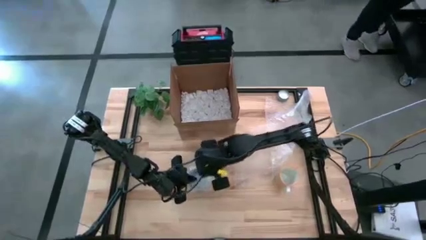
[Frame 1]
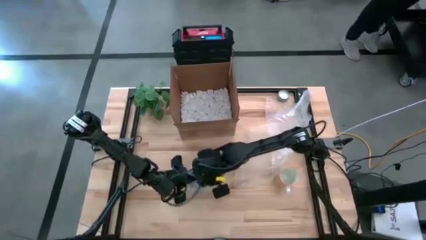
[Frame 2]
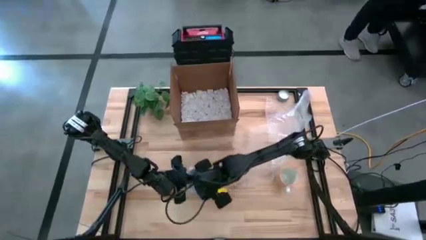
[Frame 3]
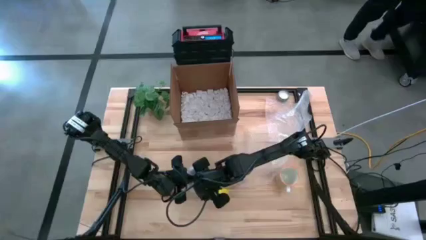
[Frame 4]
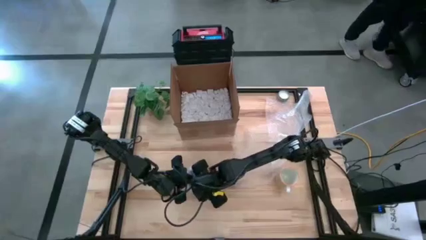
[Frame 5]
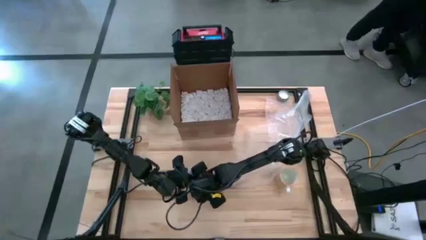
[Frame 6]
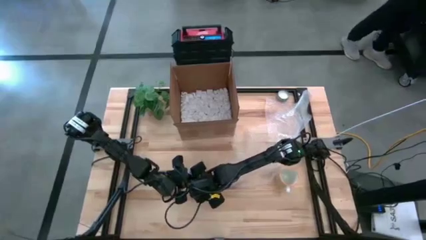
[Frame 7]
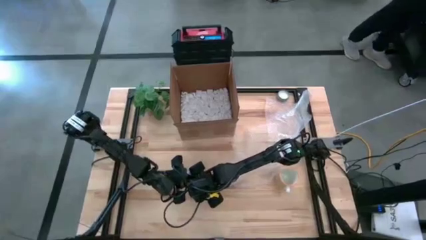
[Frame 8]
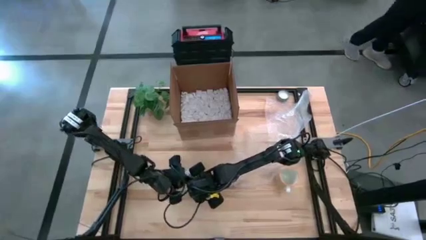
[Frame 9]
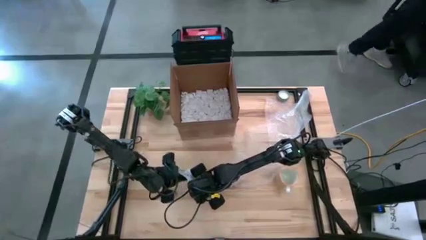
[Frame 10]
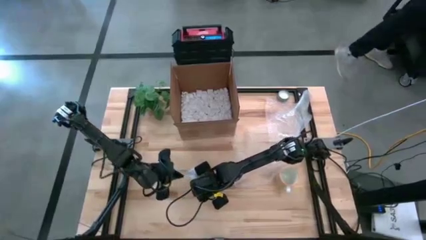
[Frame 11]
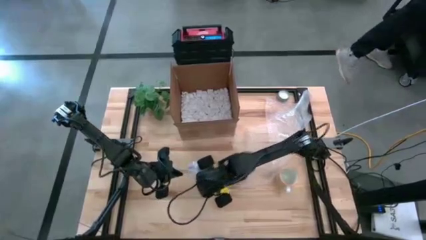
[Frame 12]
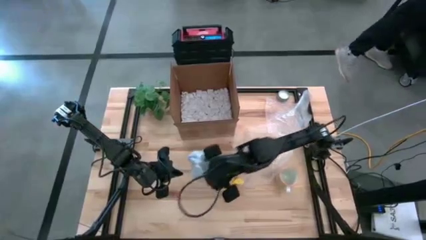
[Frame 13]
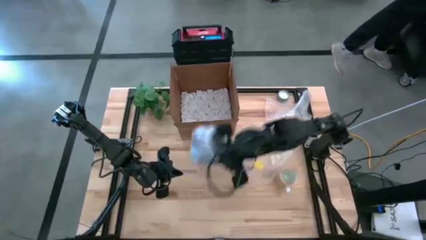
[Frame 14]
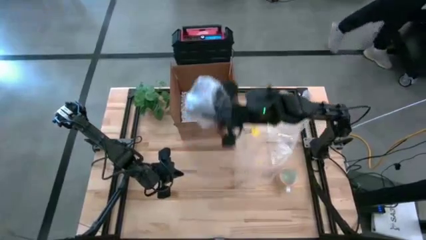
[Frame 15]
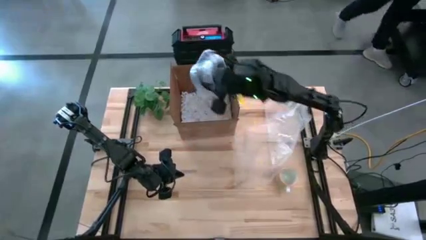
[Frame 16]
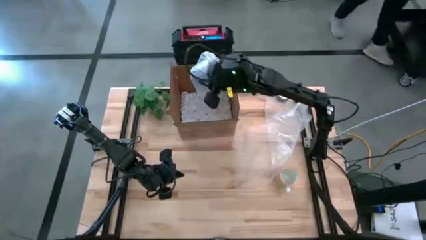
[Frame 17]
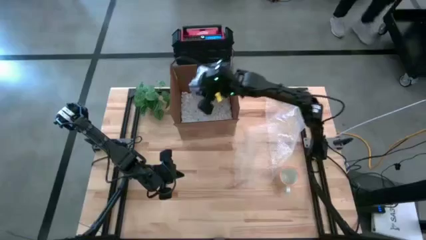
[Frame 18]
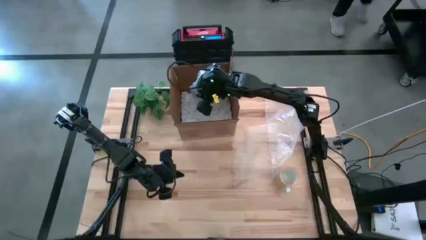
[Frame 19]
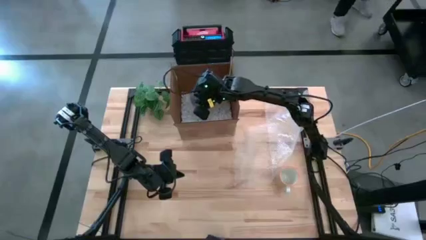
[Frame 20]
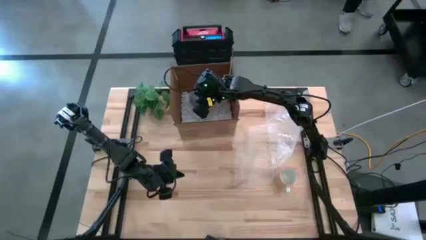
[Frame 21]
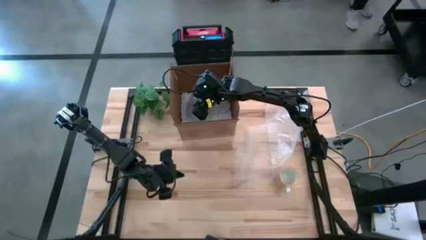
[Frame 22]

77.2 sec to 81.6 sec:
Task: wrap mug
Put the wrapped blue mug into the cardboard box

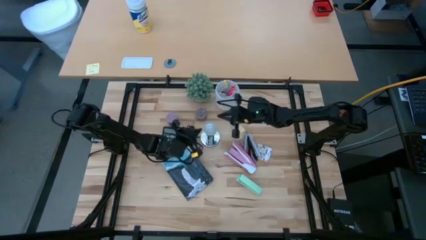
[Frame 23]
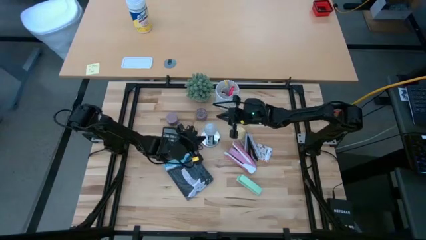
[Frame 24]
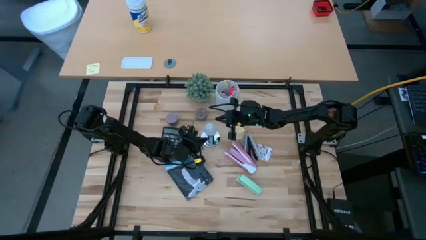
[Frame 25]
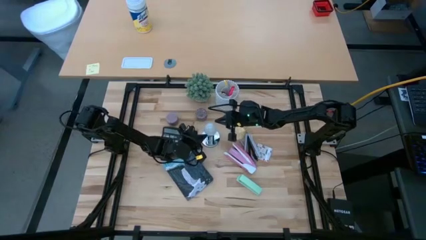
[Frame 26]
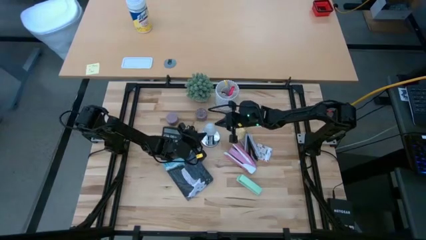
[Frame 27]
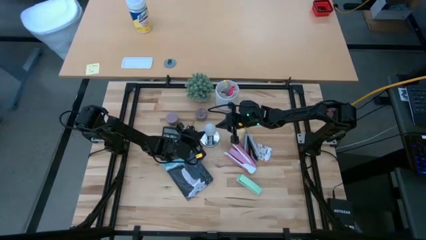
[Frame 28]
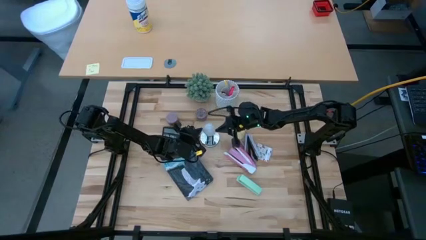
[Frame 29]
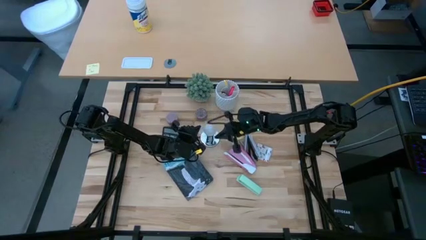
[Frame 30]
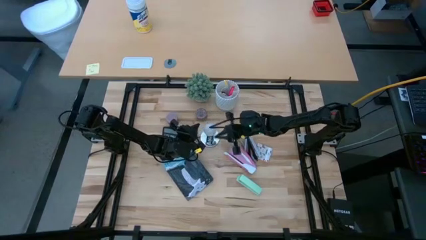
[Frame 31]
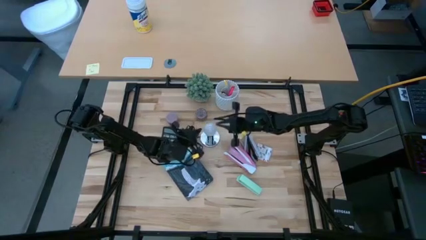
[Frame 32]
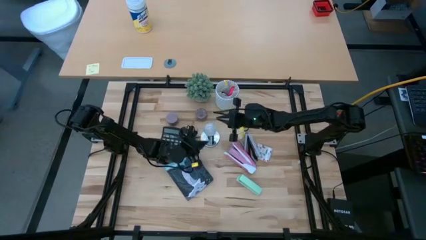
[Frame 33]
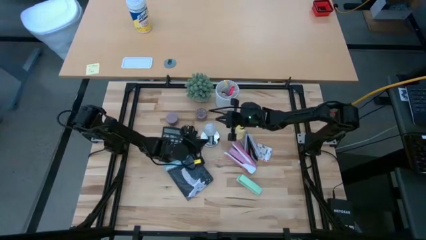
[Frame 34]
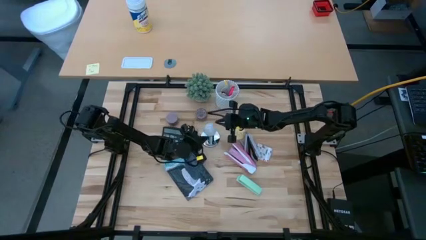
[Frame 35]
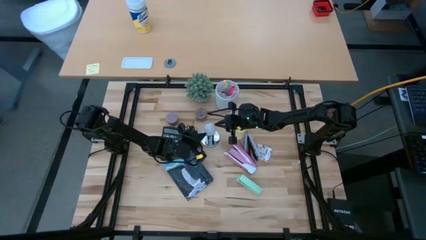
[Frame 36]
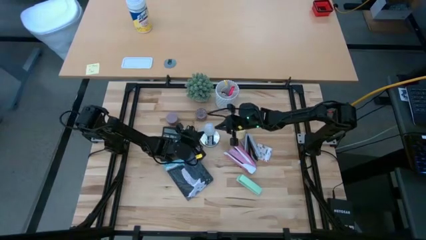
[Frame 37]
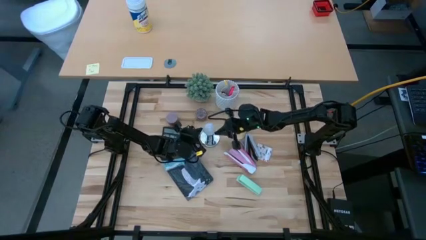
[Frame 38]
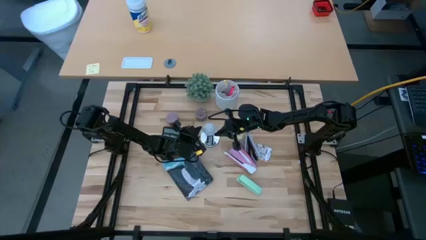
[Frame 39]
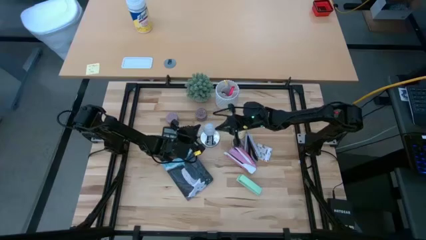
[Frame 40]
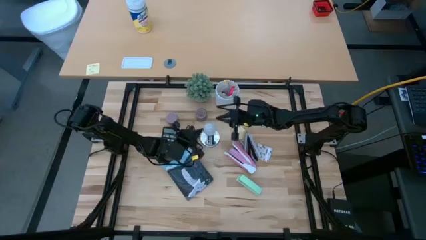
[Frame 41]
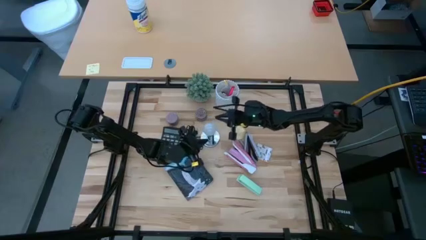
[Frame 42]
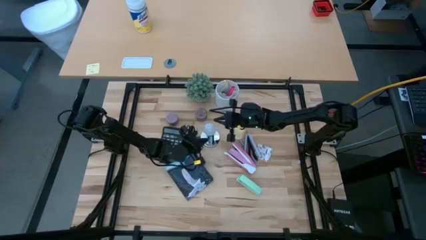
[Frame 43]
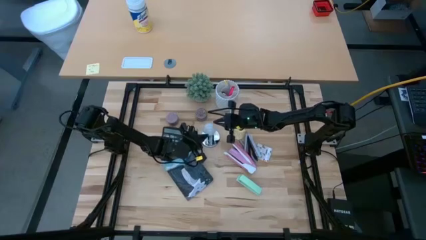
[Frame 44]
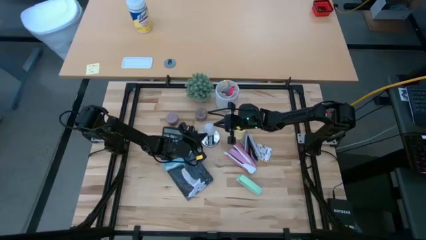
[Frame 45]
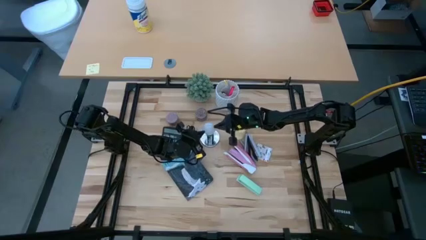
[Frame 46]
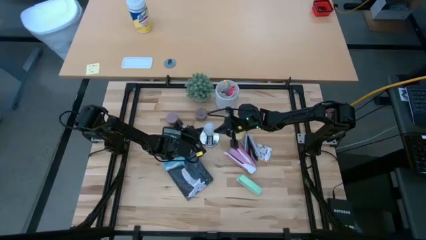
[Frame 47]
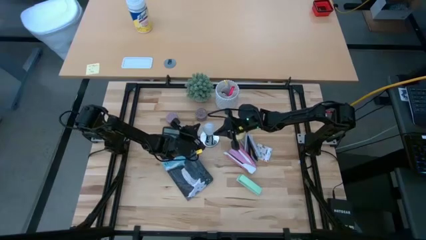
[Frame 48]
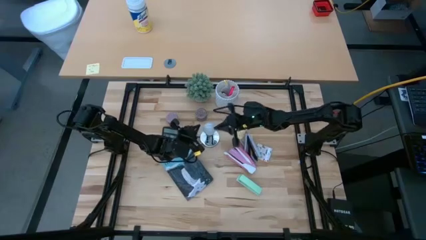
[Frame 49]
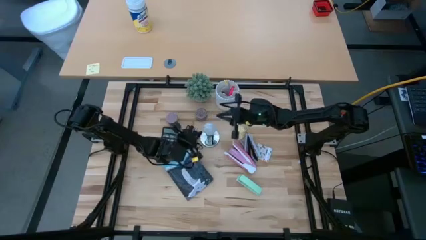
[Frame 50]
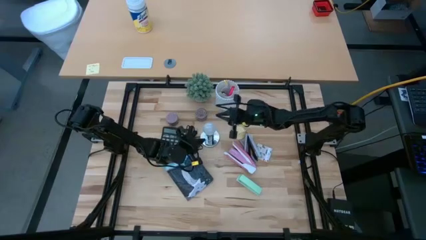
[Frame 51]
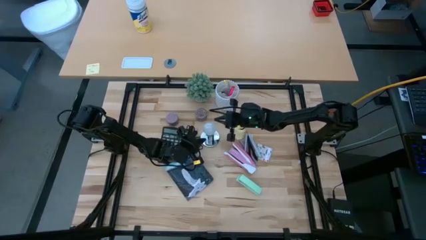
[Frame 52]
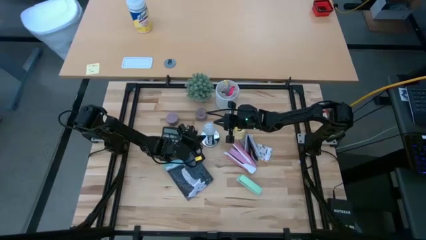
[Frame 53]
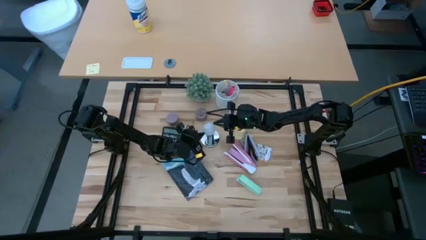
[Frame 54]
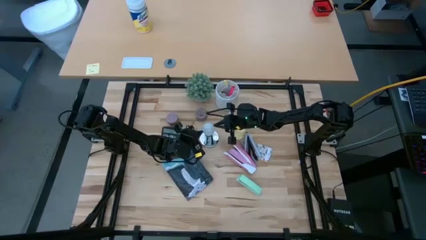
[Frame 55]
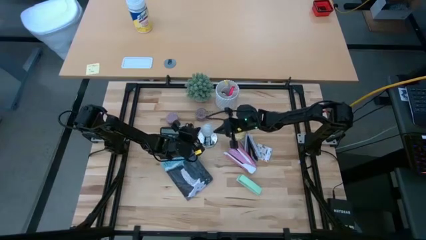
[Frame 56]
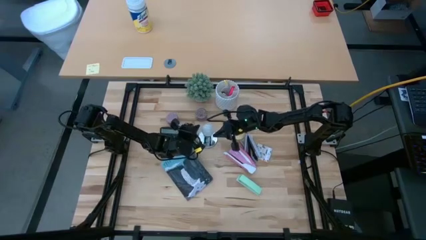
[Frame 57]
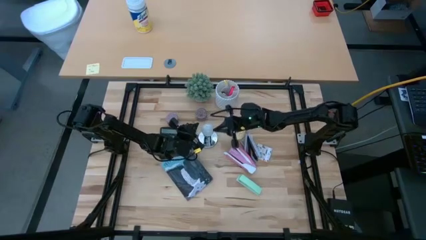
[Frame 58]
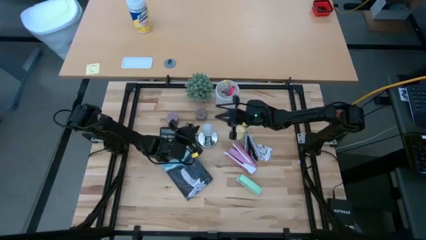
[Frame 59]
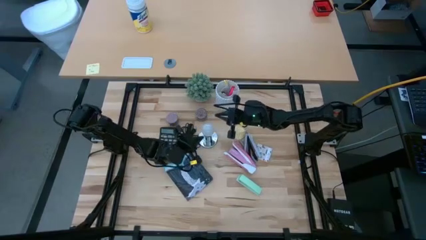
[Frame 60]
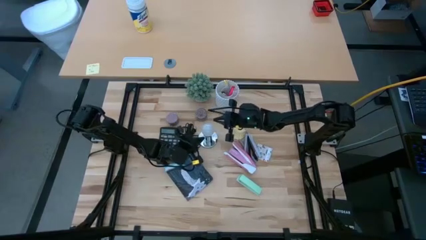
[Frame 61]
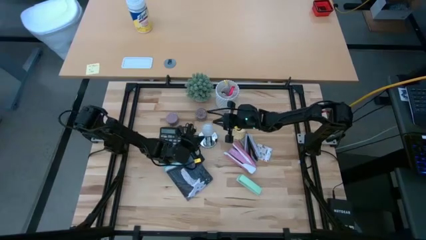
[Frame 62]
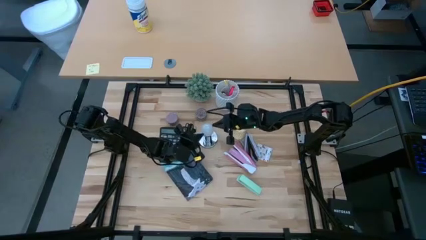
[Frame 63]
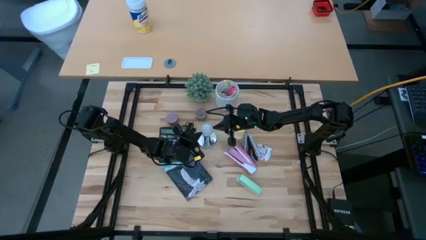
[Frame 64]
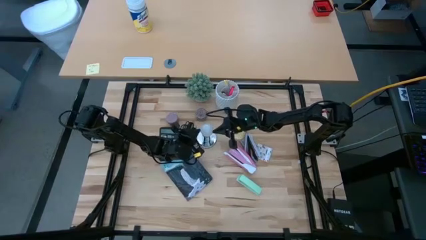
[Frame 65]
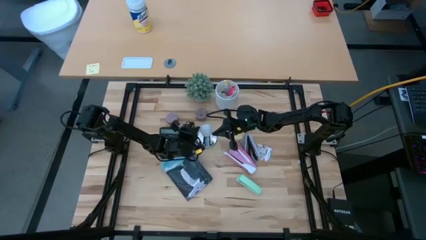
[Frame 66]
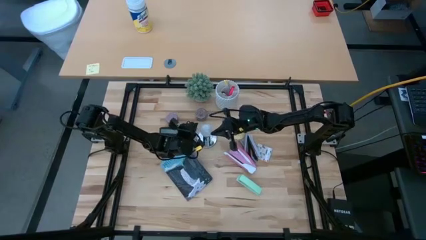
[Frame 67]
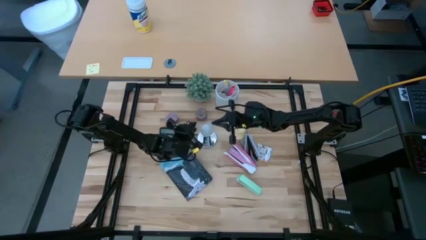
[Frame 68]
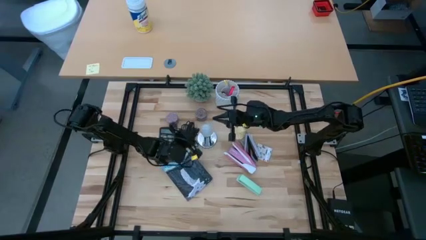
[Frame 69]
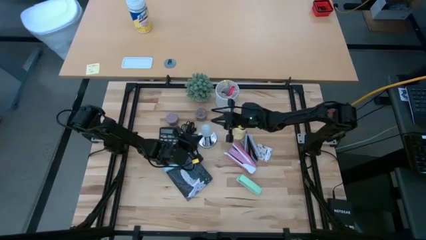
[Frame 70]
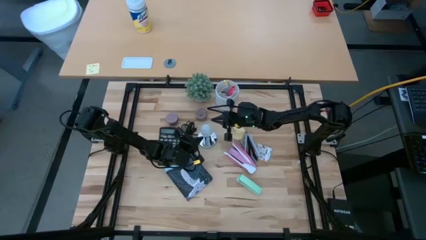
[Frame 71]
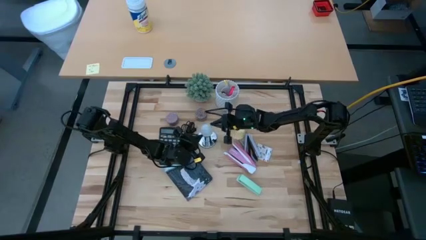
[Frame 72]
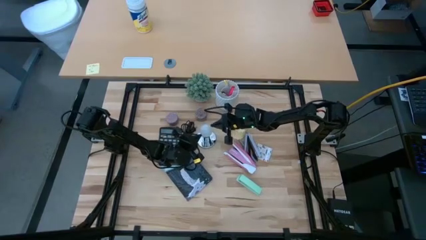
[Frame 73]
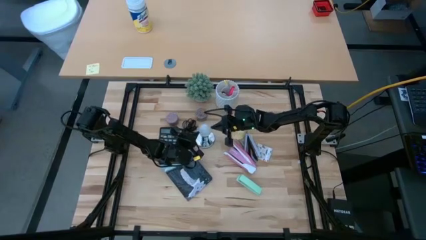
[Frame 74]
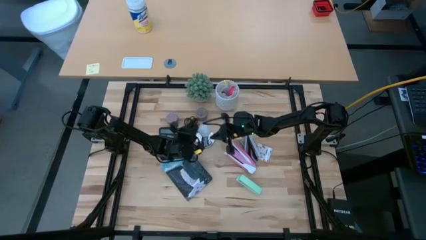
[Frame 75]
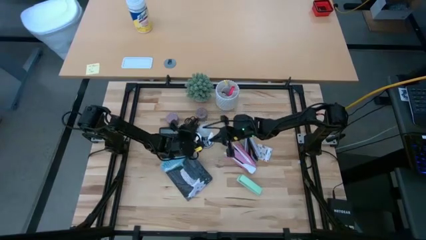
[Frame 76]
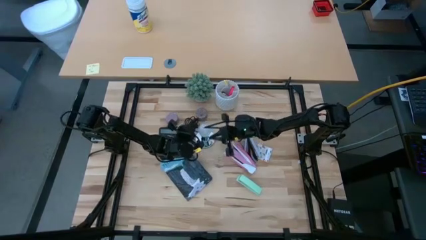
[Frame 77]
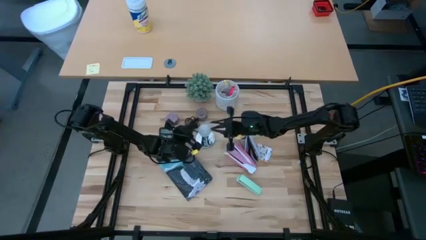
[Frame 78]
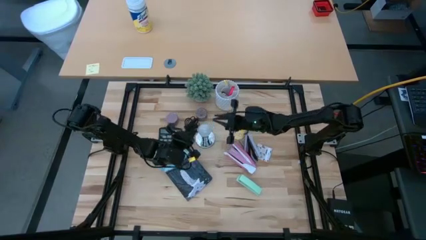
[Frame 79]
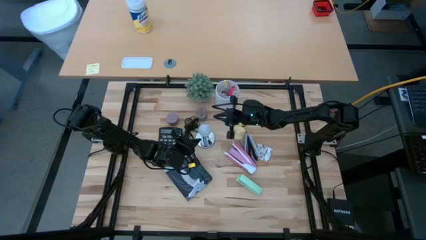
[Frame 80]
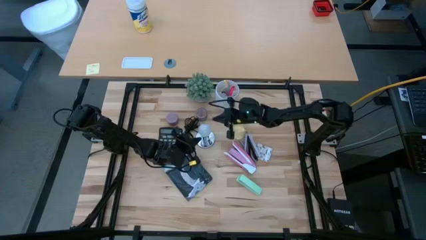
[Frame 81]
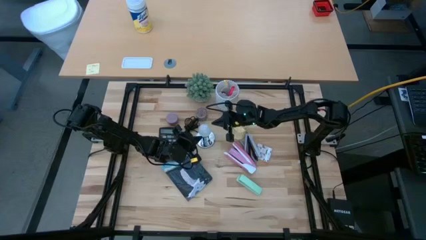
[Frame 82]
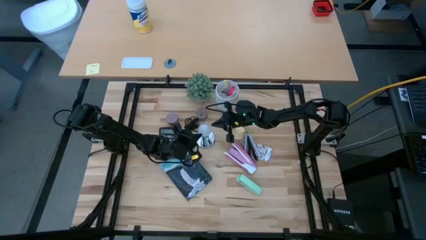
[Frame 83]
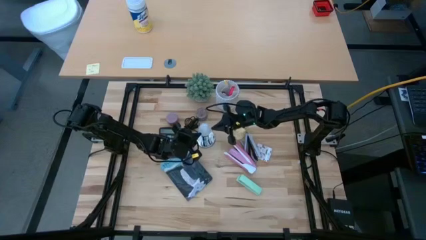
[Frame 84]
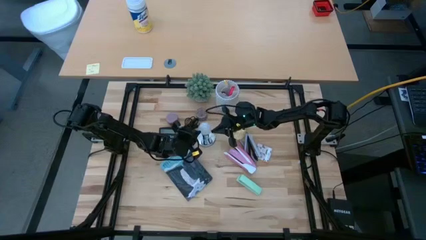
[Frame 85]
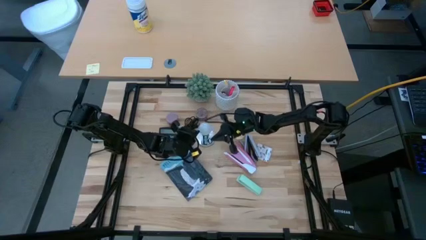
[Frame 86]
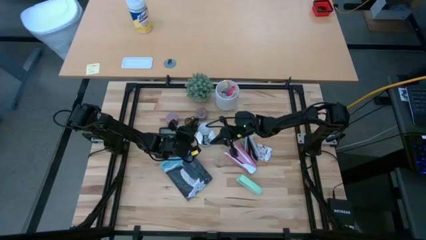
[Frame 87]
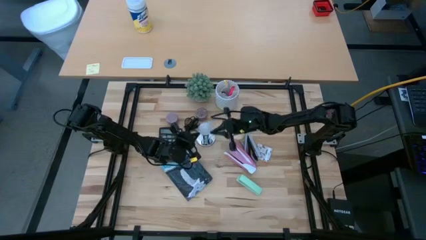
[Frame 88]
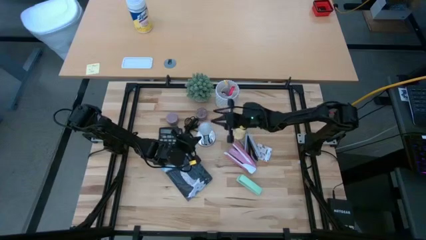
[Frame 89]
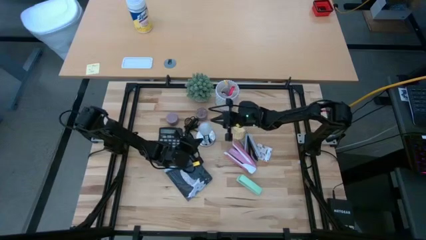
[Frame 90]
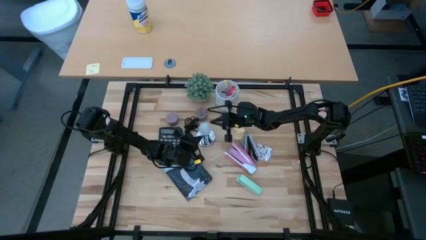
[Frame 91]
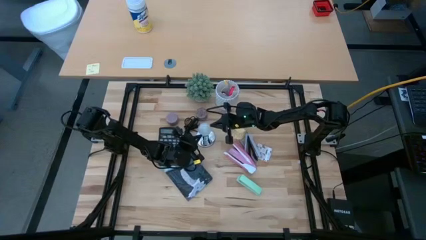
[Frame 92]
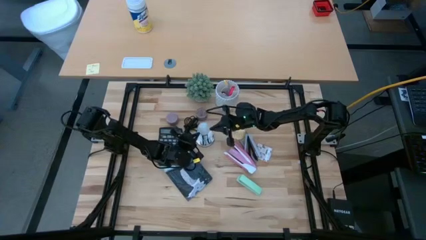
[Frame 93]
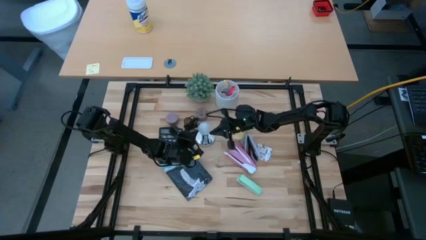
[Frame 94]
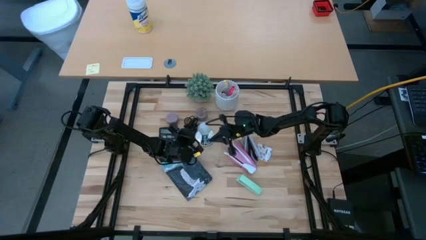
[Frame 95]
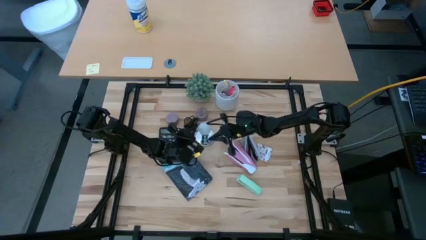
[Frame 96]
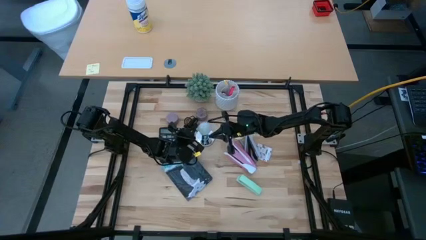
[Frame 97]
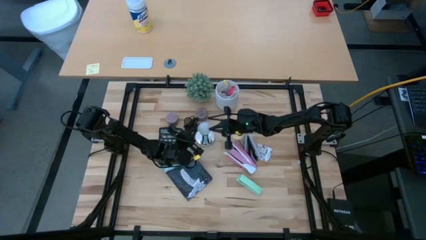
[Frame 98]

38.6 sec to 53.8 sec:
Task: Screw lightbulb
Insert the lightbulb into the lamp
